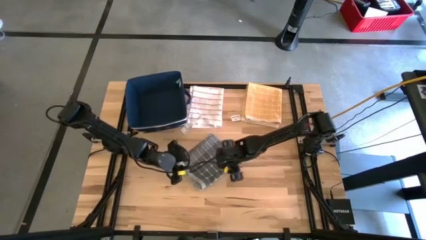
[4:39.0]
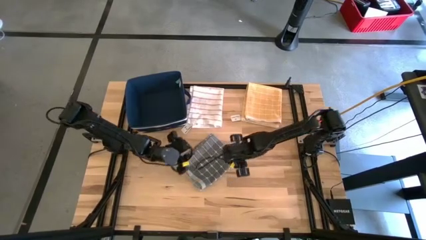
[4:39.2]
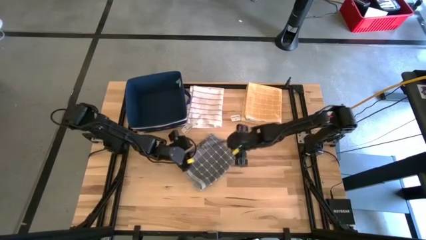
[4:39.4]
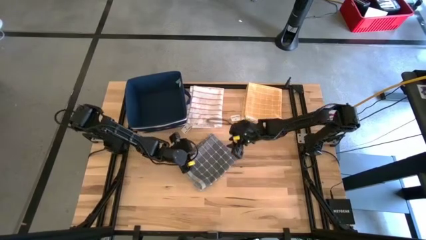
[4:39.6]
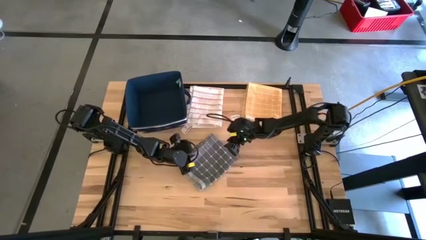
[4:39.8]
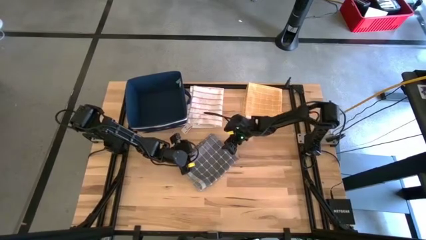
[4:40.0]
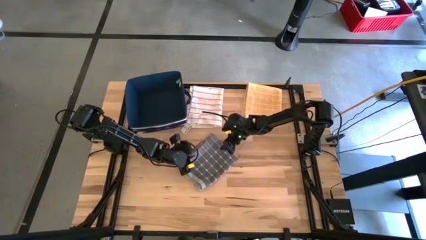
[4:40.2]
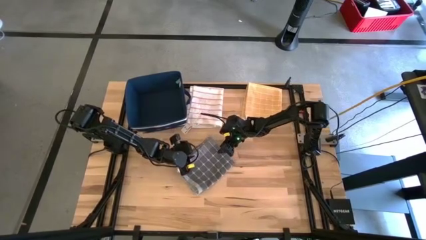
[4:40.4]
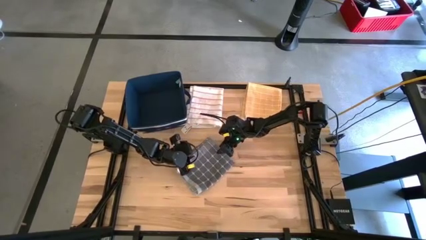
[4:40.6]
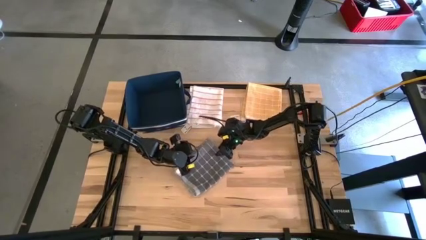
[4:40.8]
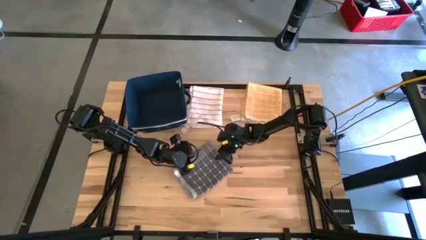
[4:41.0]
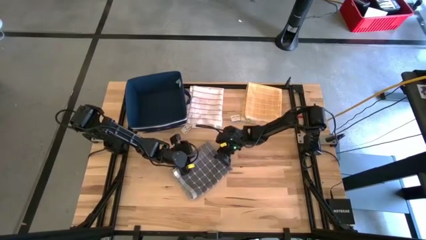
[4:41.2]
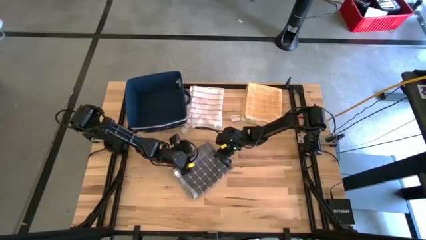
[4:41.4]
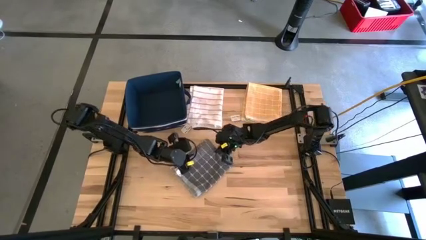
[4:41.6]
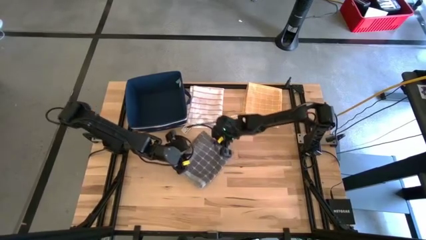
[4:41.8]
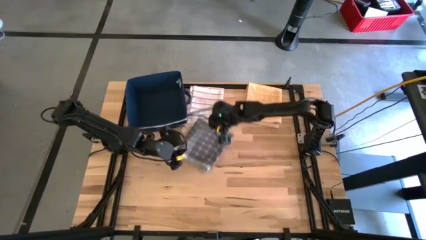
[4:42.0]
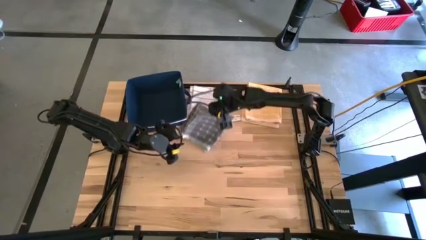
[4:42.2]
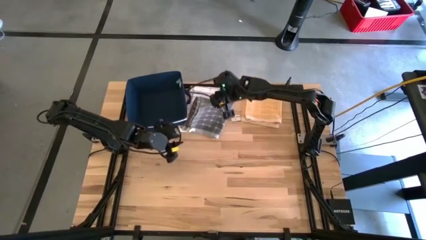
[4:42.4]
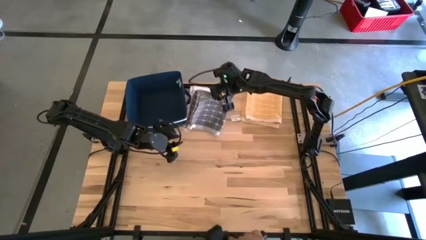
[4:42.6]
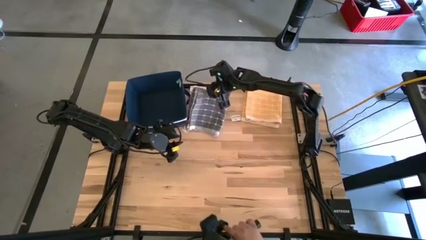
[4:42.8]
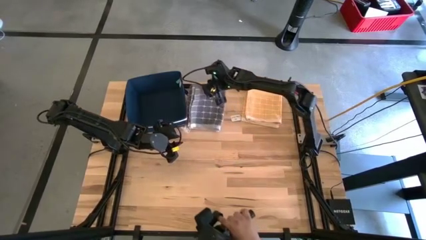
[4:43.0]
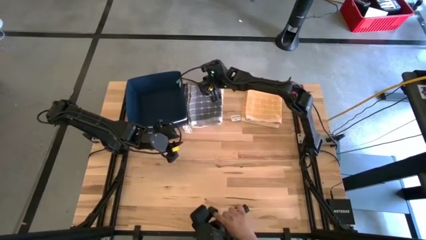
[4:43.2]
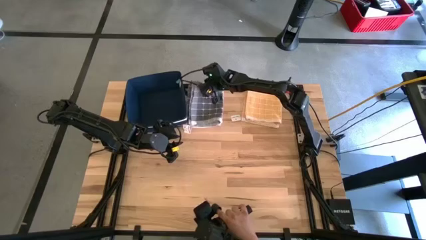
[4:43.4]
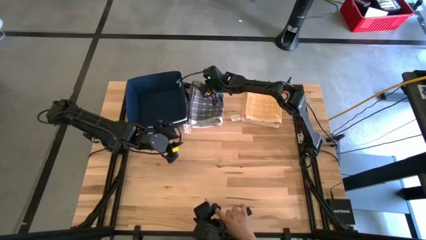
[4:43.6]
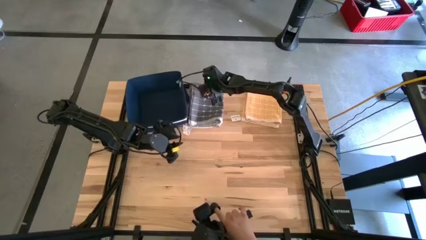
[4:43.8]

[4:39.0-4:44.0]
Task: Fold towel
Stack the gray towel on top of the white towel

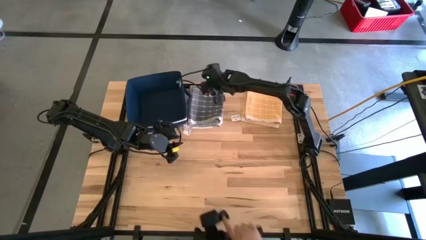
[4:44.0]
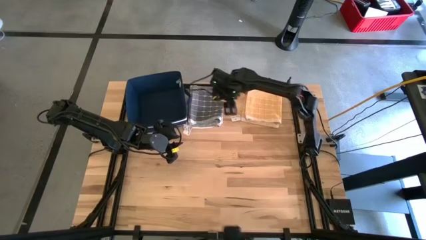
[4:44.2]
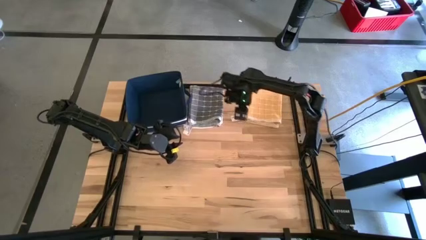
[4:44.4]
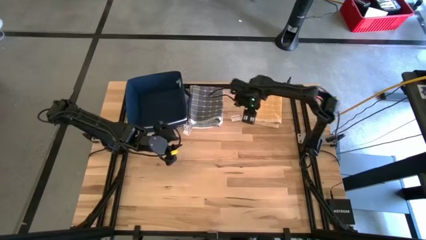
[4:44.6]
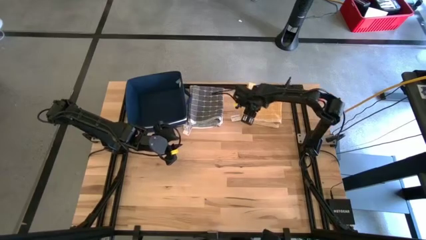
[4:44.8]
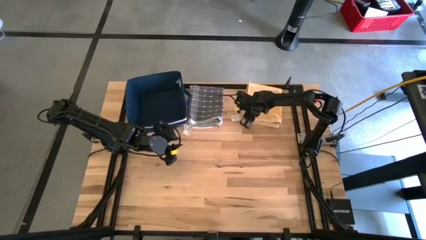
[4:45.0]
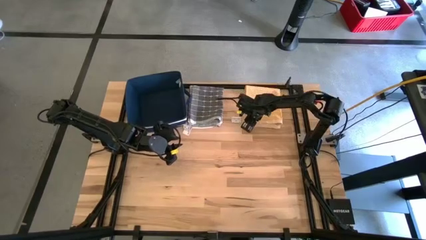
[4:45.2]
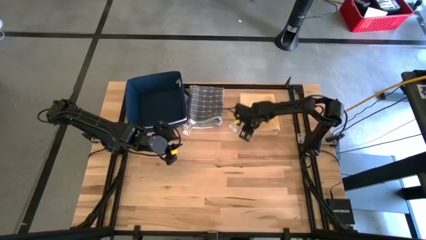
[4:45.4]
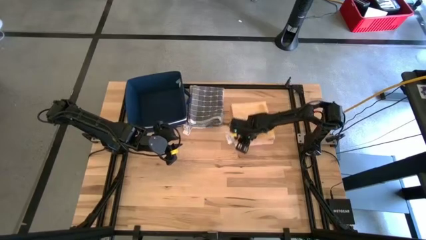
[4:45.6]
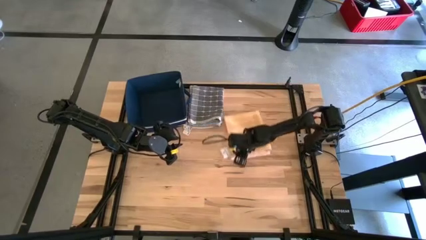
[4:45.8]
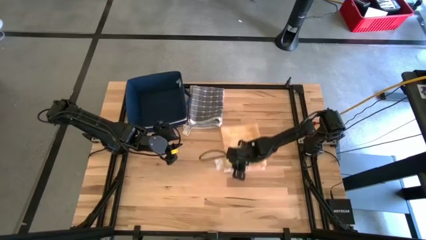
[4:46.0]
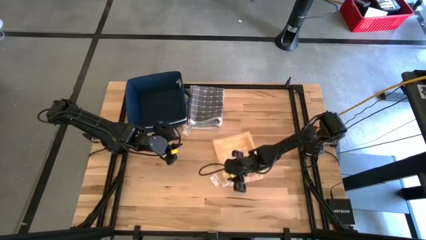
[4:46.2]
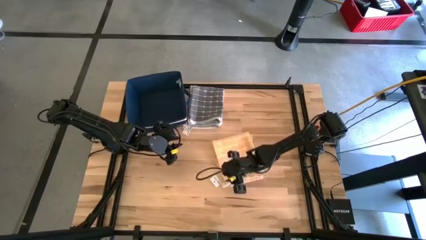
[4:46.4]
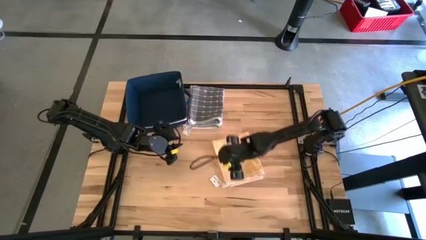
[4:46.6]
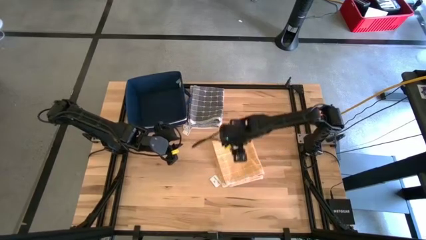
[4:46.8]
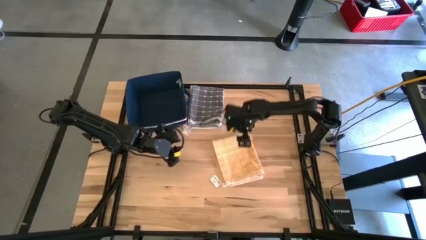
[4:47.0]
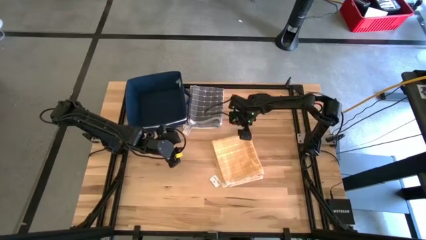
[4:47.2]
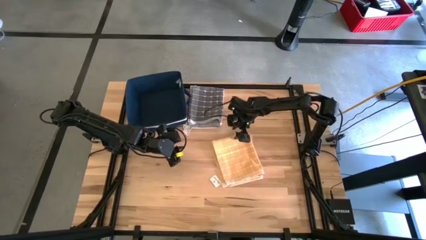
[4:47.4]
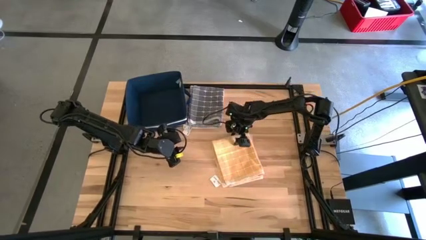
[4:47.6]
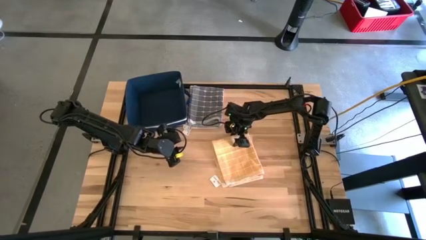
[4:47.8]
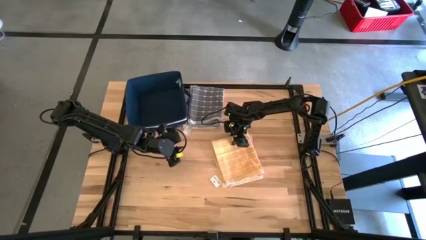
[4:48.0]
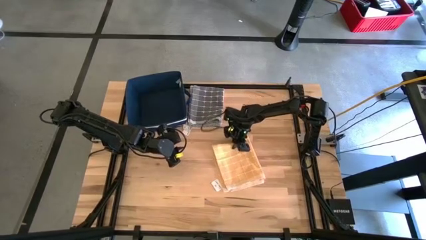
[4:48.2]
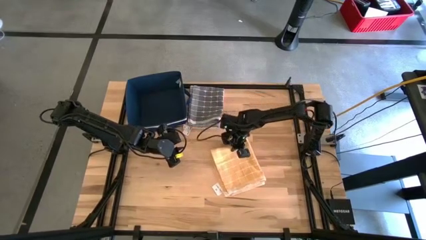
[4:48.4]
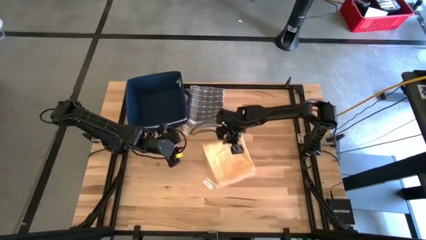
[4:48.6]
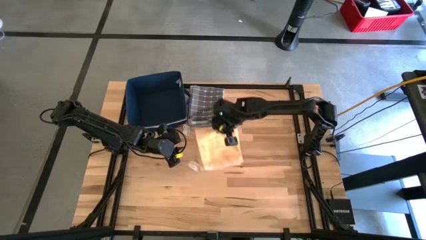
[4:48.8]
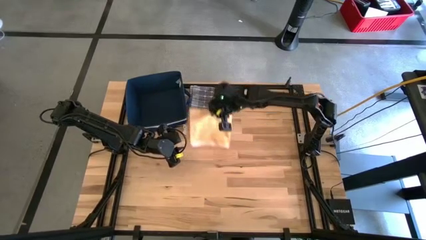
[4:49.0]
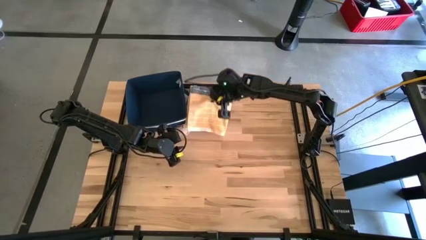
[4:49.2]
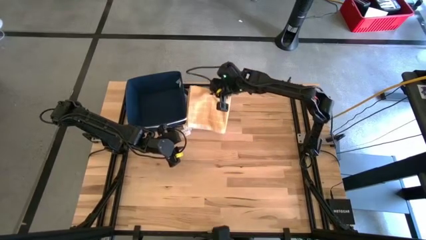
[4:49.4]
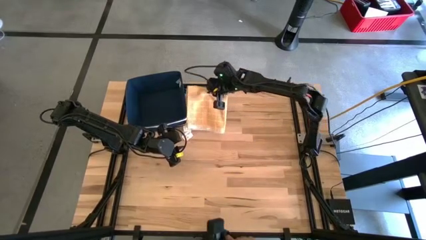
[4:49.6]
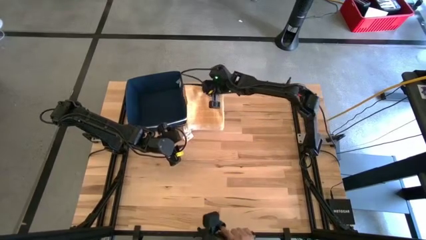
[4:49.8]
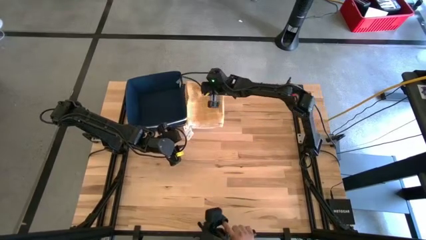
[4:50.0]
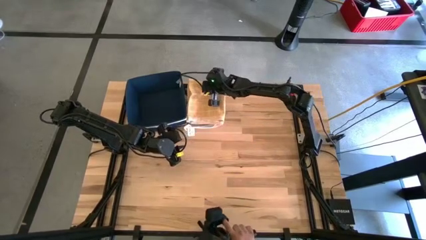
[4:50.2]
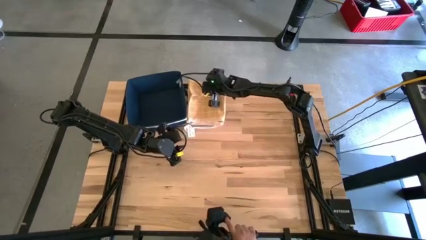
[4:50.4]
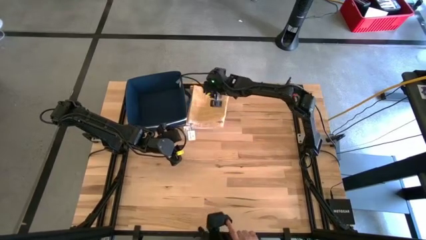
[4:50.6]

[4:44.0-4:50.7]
Stack the orange towel on top of the gray towel

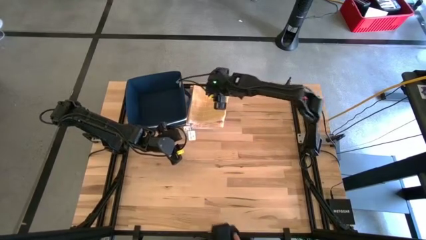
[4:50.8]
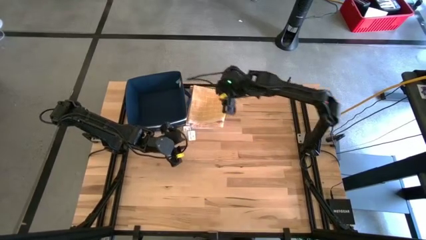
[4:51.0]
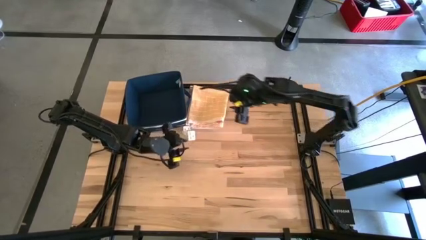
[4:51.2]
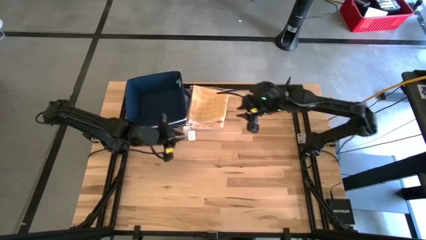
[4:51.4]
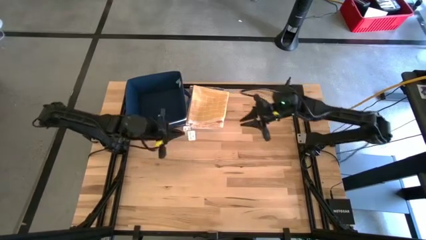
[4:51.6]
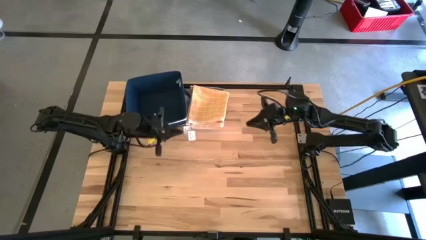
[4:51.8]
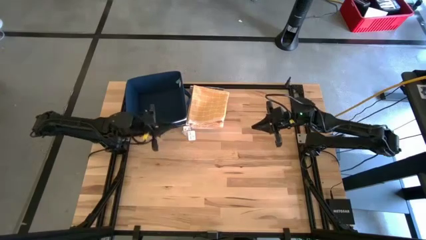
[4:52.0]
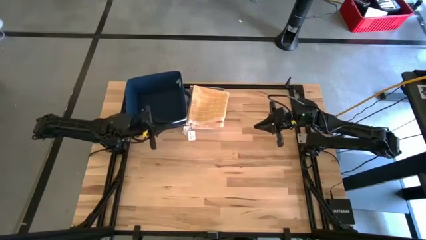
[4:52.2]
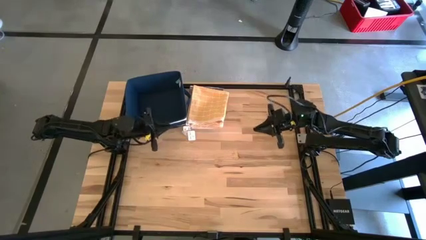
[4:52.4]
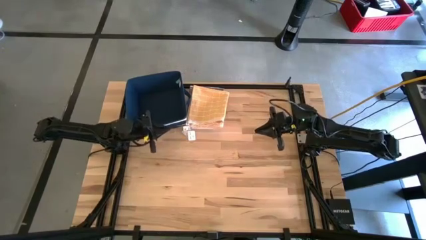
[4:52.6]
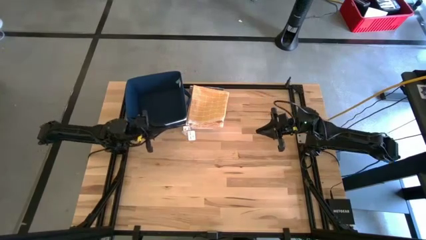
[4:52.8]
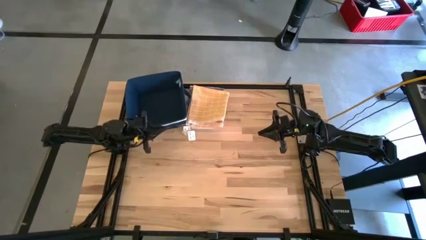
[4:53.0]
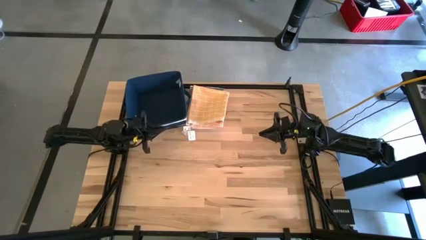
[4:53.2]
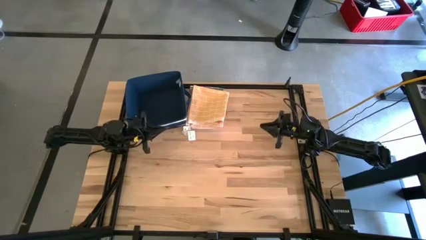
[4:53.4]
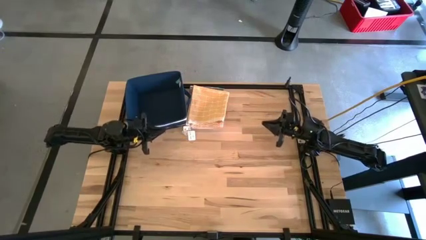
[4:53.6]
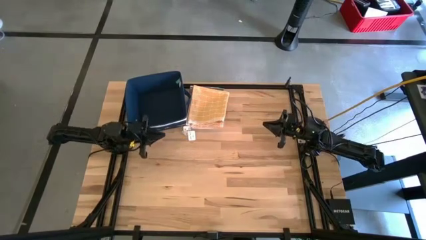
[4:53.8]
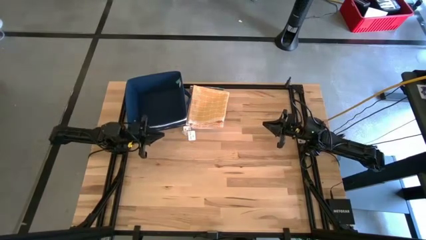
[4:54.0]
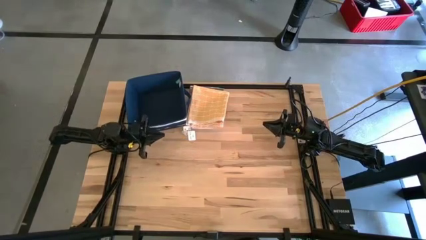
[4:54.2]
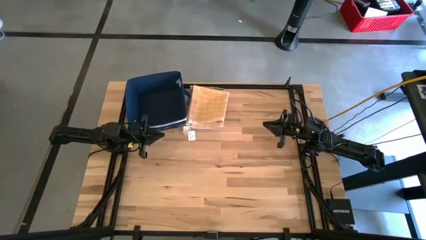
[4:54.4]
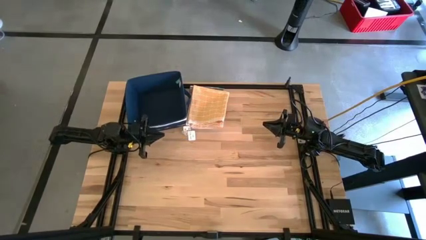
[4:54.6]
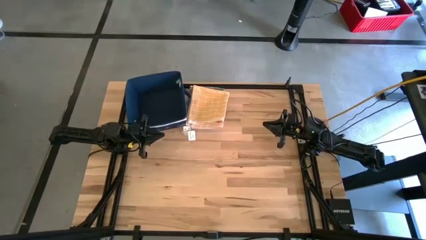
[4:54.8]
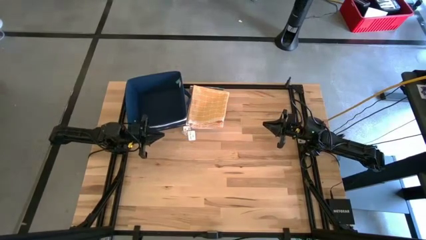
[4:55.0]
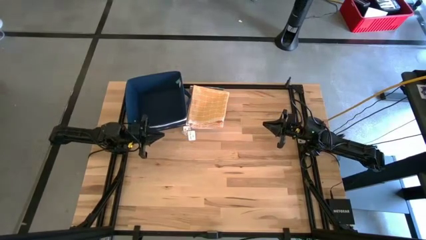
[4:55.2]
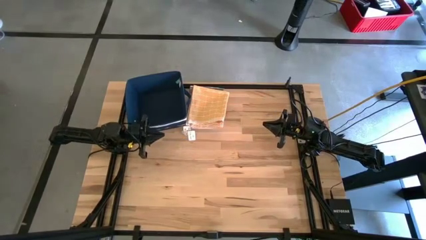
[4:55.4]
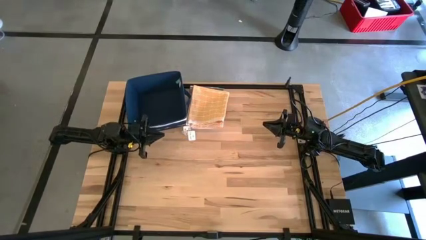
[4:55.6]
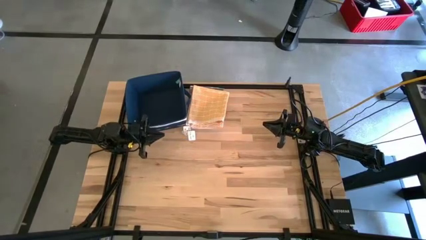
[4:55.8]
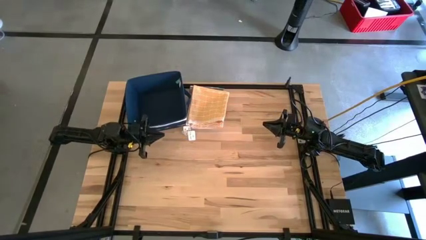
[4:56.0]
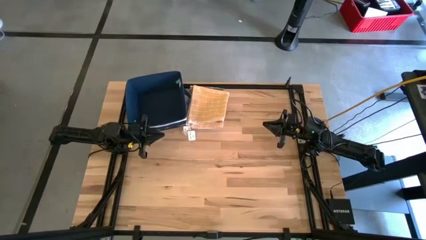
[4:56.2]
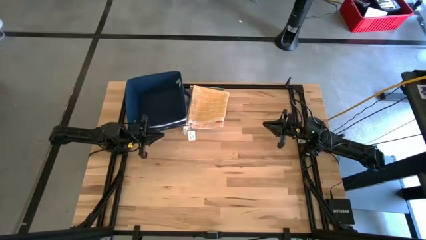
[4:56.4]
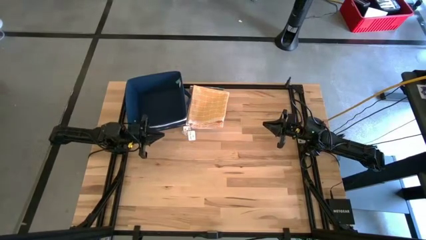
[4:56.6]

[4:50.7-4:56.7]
Return to Home Position
